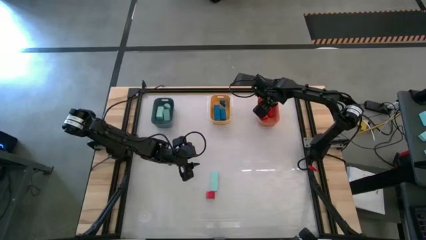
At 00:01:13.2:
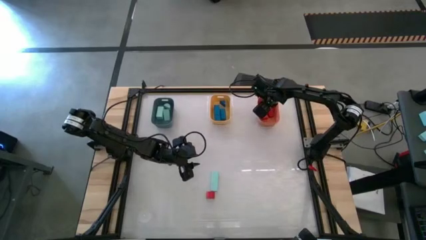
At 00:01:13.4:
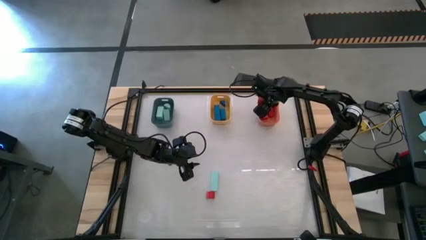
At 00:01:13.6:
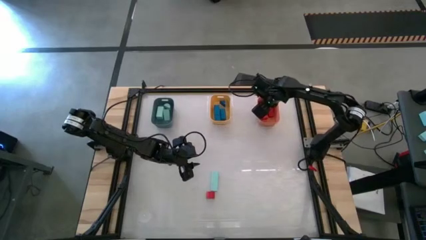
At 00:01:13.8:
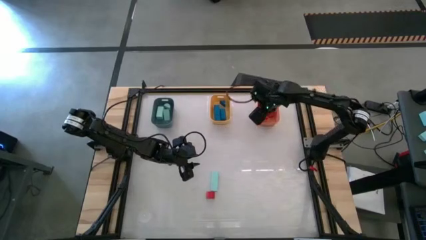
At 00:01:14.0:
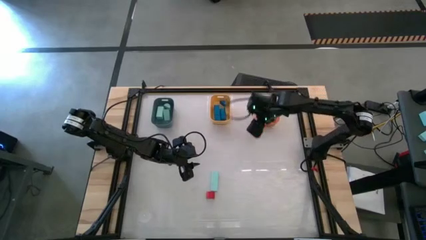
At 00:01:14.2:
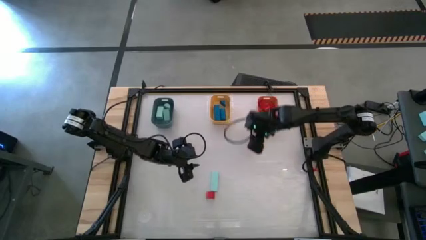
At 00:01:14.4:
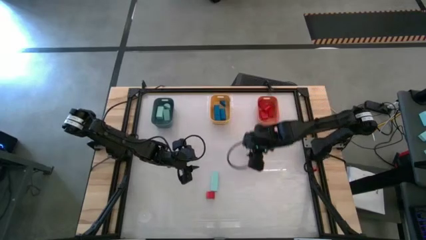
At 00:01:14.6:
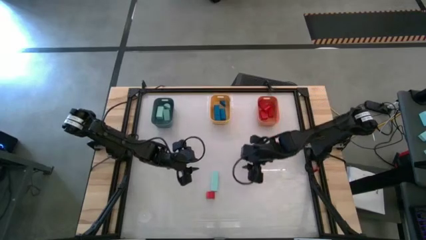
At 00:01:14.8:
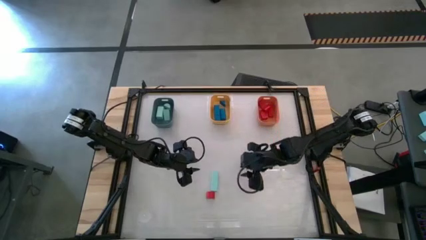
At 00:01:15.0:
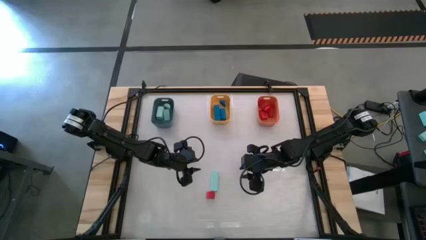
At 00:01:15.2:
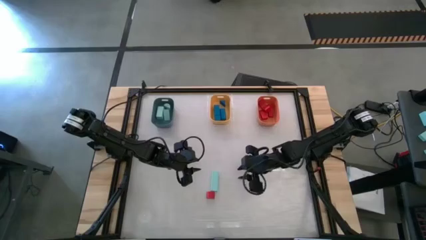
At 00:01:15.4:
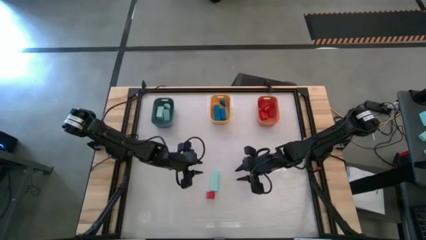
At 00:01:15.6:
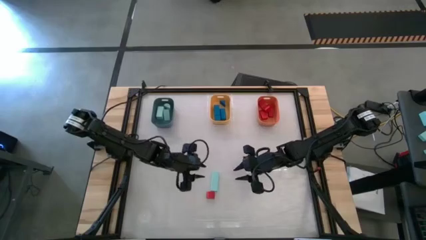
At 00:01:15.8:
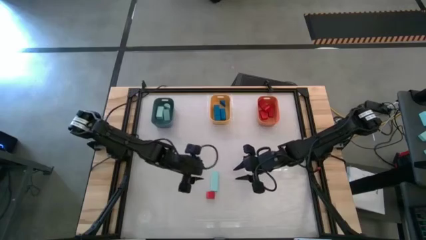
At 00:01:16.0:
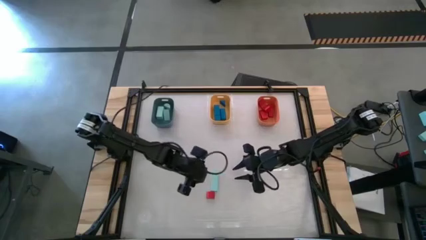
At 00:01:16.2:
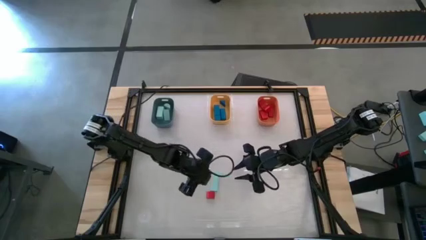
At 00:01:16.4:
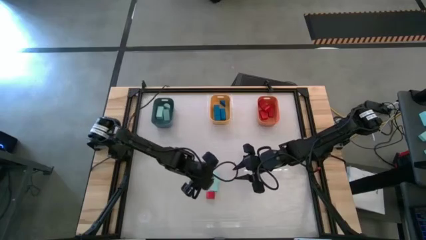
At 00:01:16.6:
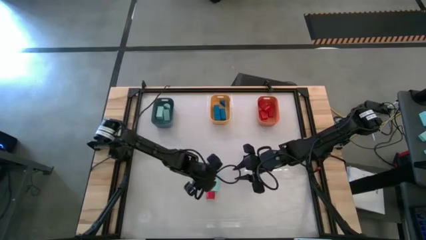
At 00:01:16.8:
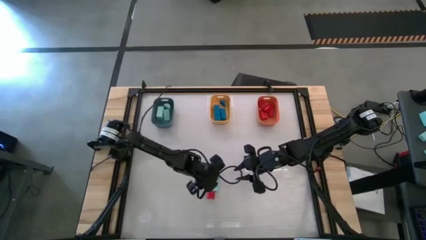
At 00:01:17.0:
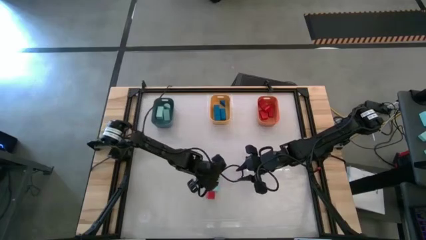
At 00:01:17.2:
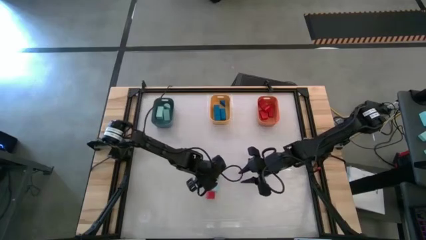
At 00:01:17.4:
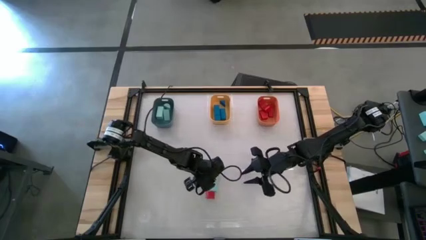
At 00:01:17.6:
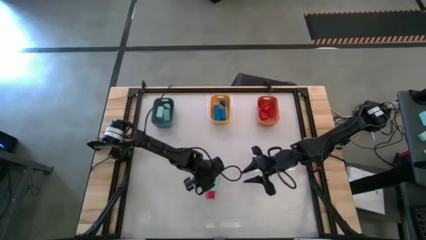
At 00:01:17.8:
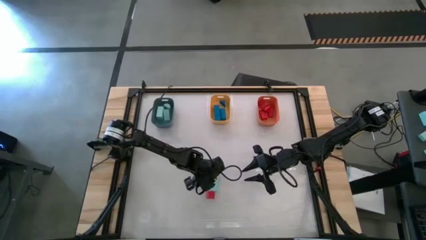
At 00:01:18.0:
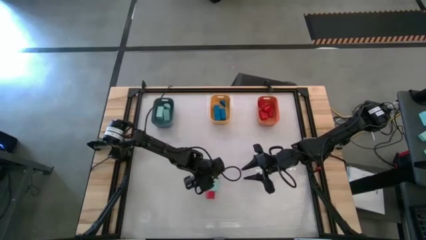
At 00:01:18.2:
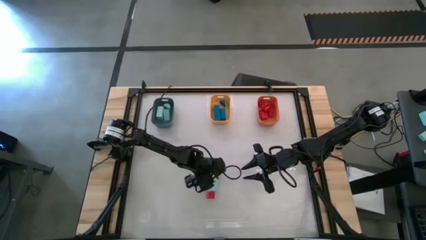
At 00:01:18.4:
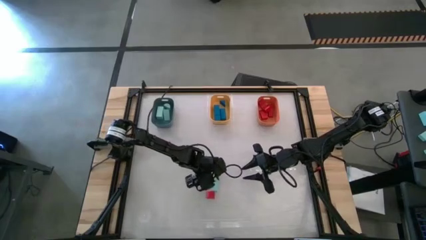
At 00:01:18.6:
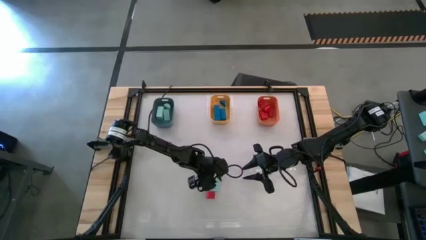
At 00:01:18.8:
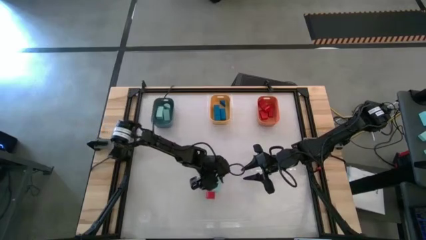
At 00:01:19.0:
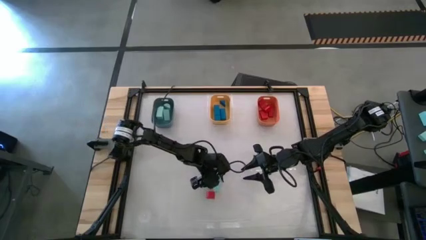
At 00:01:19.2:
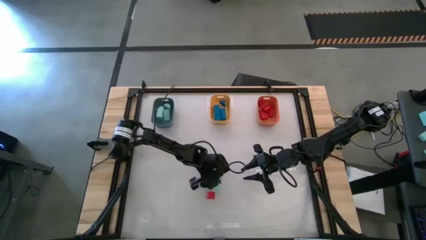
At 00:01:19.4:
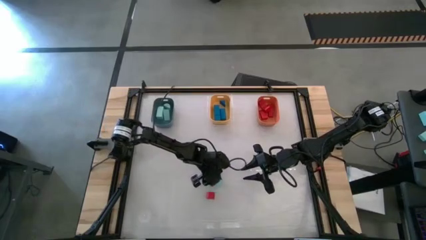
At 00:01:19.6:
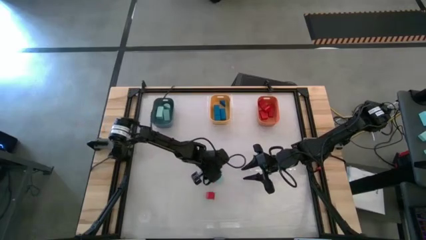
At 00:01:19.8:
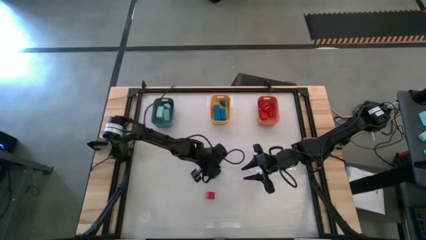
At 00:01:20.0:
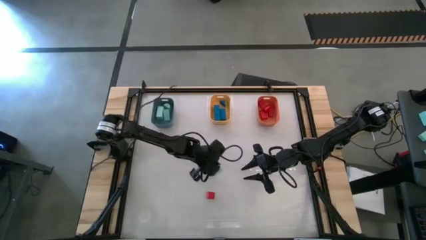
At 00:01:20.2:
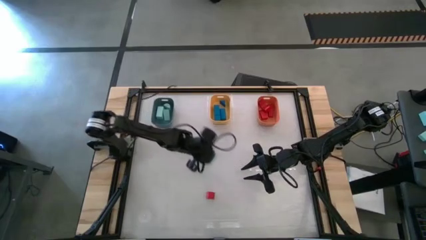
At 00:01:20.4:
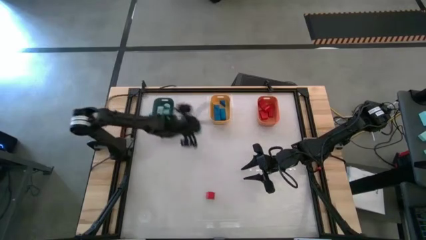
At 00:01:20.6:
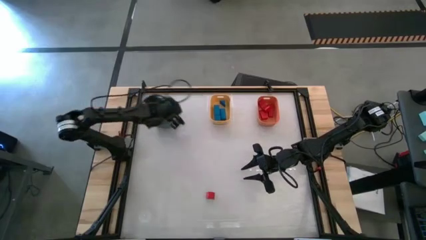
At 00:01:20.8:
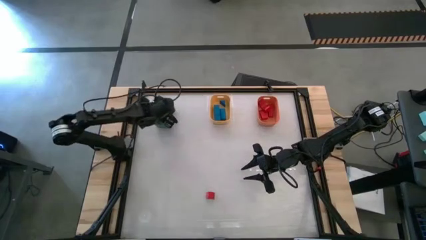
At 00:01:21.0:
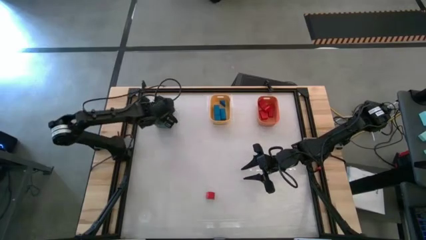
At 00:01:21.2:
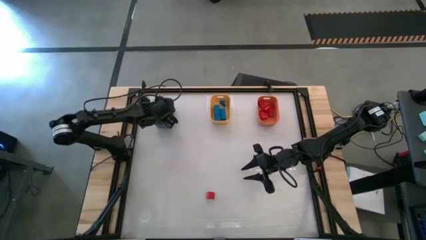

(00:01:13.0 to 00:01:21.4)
Task: Sort & place blocks by color
Put the light blue block into the green bin

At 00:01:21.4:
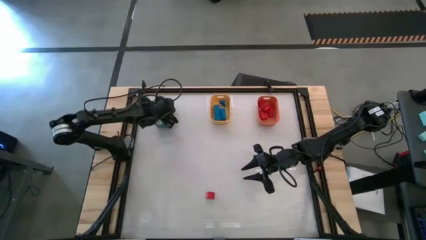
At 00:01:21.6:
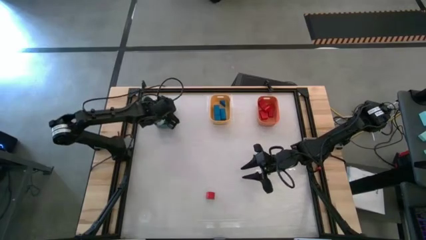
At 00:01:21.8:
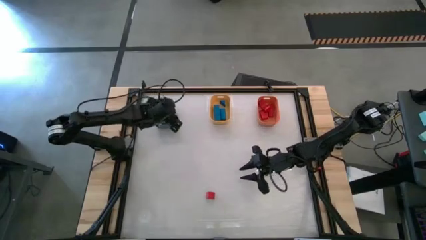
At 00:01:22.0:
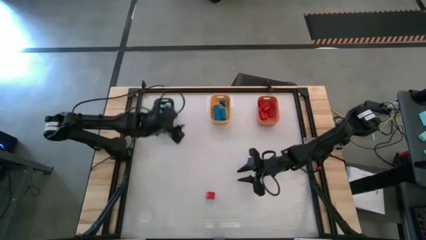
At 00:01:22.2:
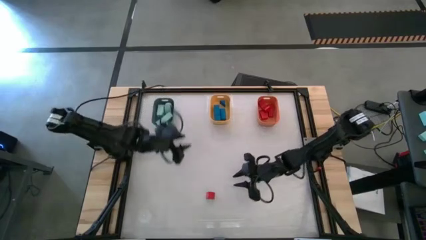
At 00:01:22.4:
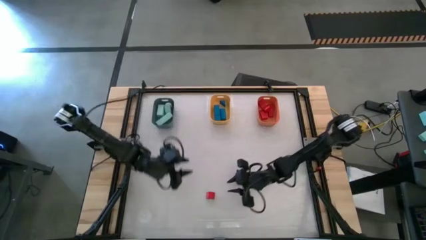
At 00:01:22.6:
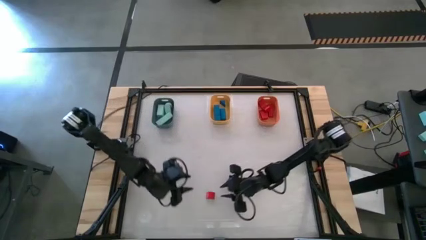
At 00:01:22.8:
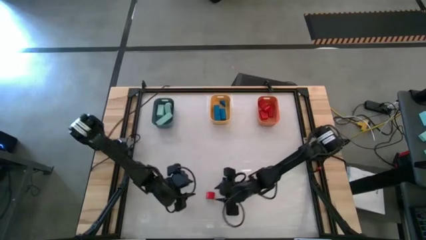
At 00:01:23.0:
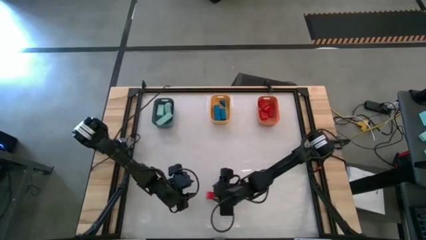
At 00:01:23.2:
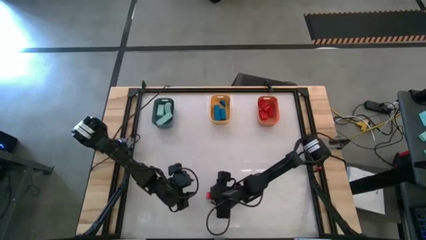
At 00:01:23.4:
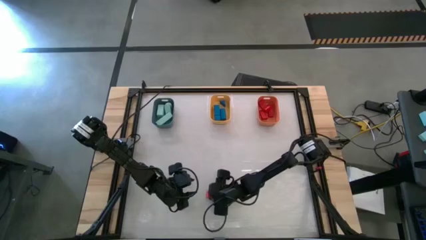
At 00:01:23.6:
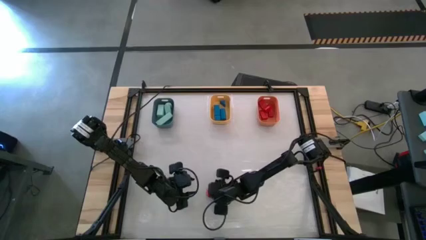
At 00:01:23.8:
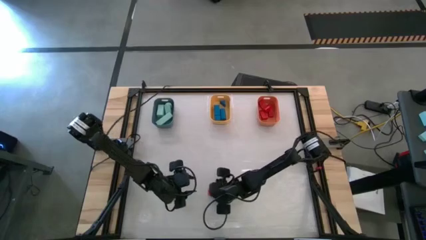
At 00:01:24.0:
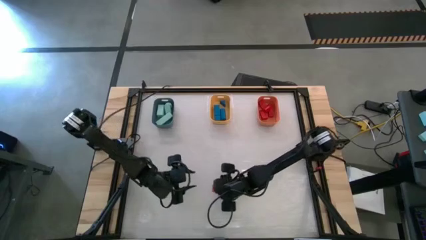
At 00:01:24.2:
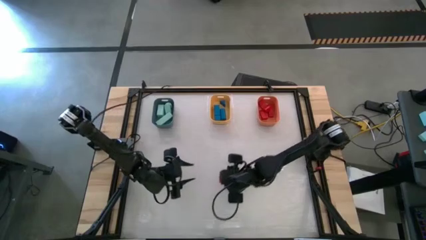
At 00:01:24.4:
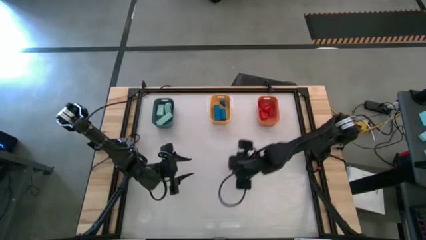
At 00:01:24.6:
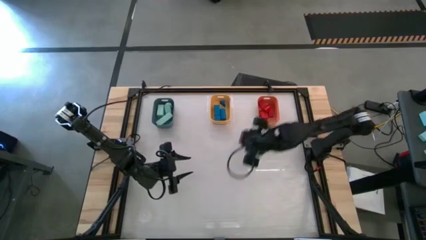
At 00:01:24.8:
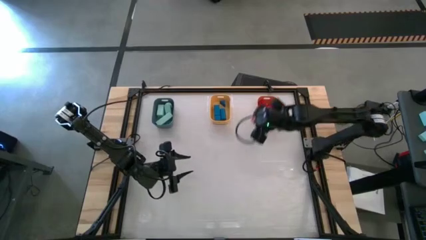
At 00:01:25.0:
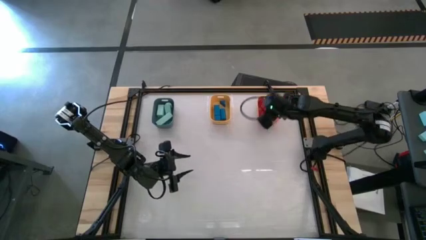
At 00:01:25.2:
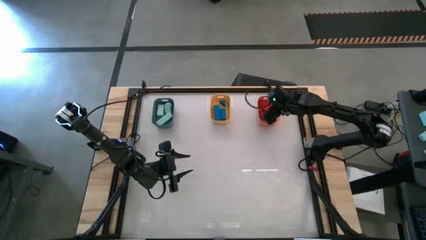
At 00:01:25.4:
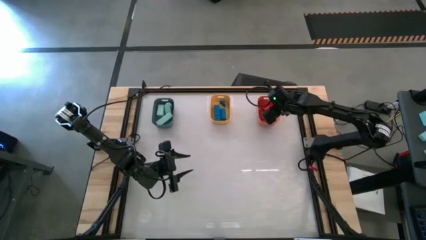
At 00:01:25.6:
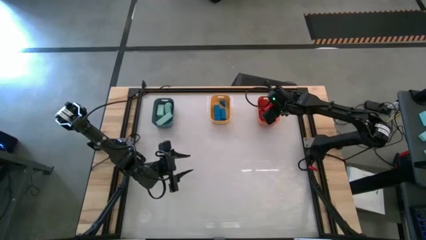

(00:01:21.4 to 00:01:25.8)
Put the red block into the orange bin

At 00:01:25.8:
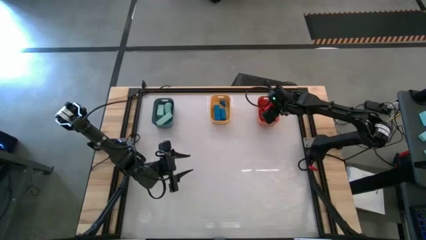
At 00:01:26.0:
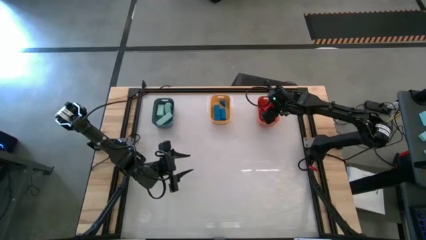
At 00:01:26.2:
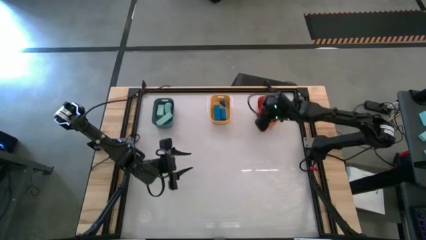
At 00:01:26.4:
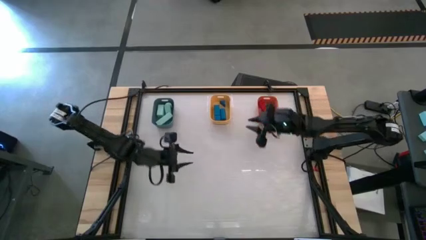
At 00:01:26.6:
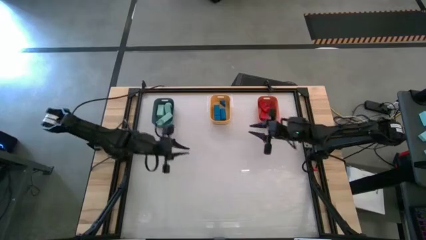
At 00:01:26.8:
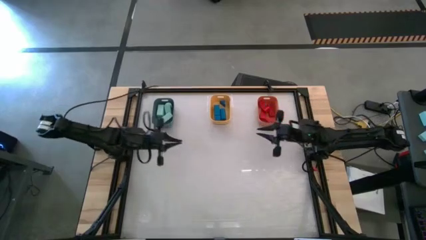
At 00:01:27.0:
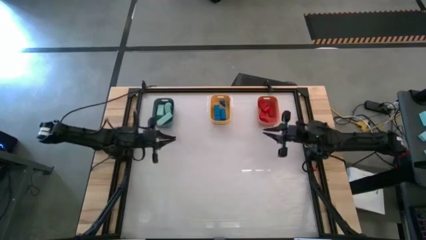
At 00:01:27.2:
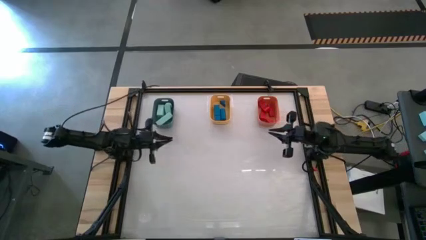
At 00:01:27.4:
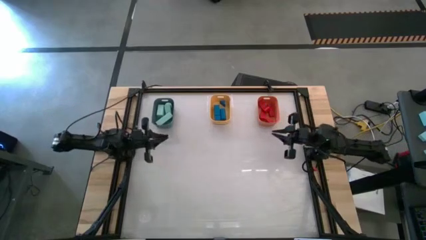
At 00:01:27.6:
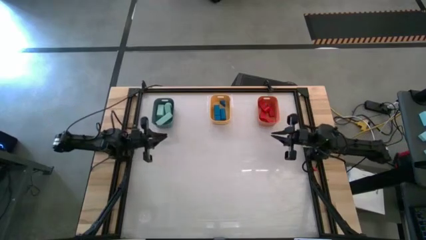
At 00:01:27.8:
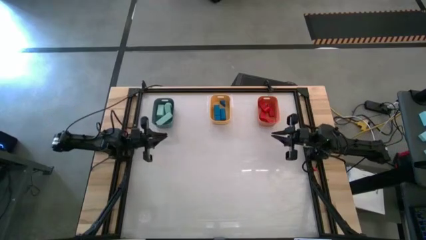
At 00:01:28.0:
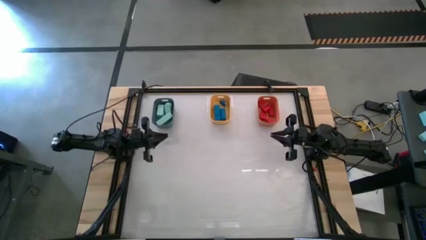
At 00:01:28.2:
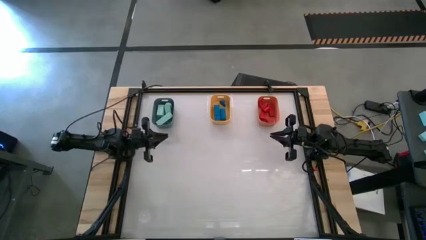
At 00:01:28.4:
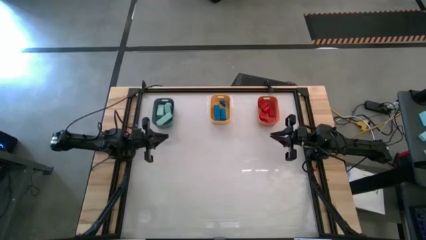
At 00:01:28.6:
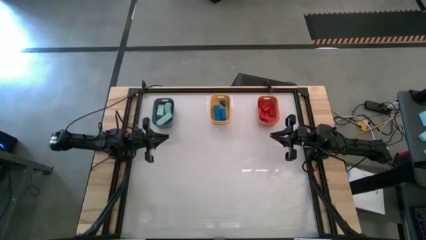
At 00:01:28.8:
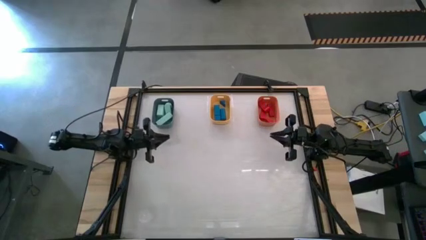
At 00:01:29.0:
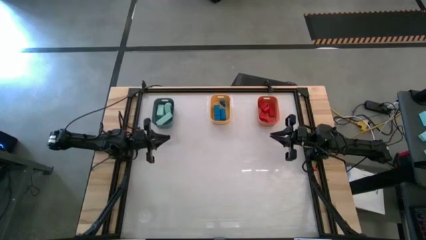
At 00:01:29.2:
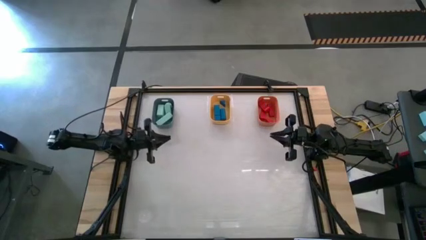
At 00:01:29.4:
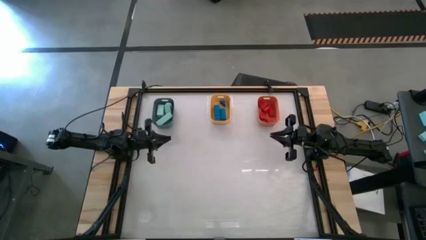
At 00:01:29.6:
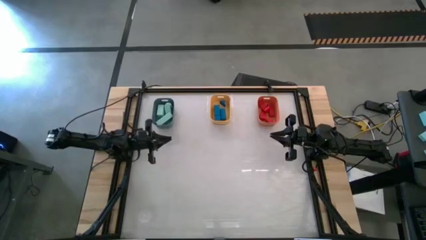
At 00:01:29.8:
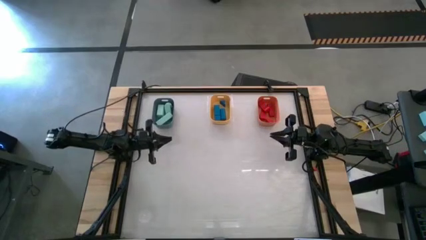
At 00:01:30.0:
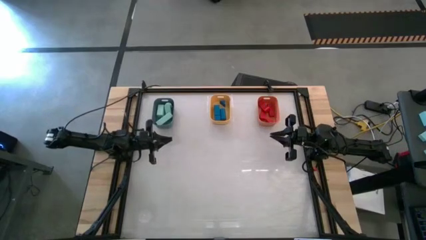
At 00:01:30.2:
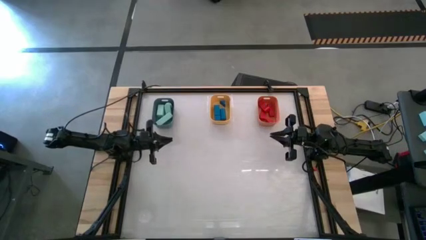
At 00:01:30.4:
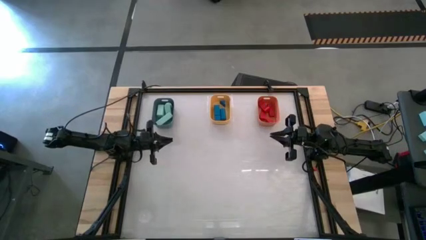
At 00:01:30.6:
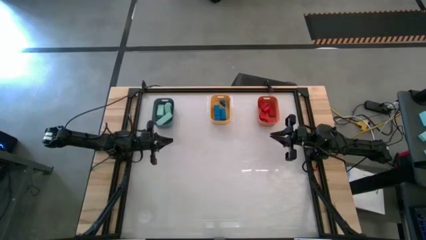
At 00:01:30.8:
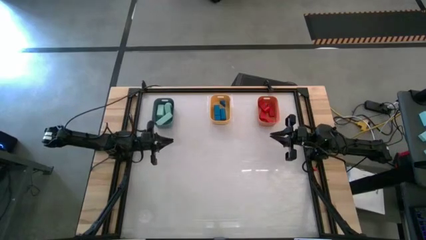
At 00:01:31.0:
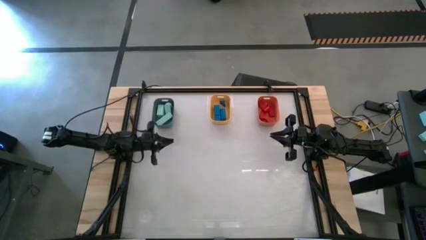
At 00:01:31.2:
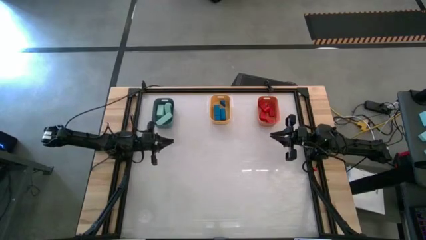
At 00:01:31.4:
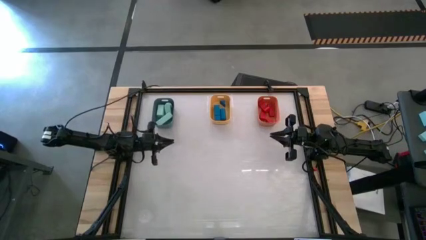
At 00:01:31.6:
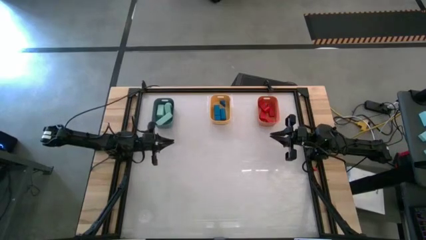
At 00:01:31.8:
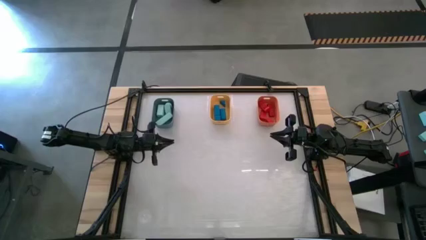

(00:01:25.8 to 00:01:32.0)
Return to Home Position
